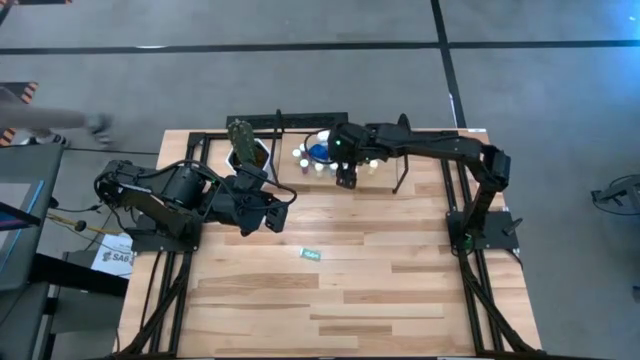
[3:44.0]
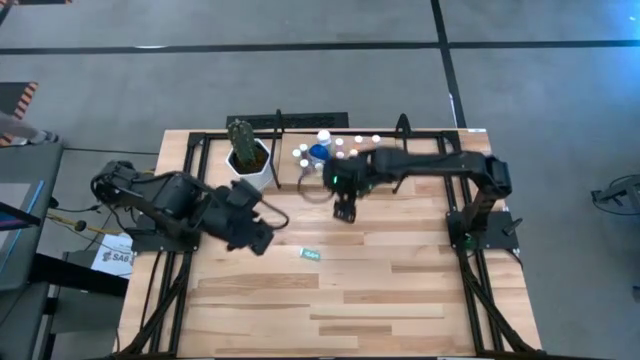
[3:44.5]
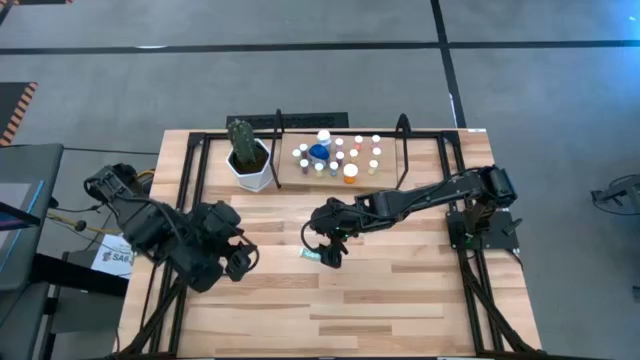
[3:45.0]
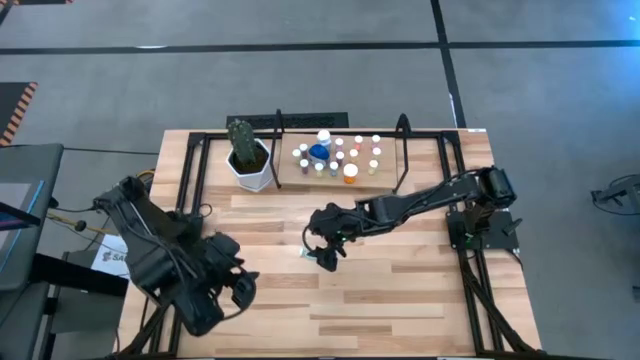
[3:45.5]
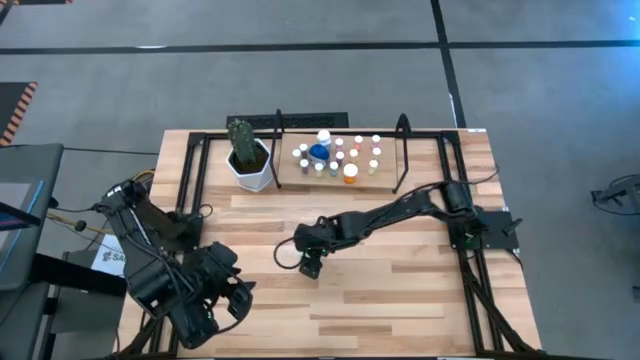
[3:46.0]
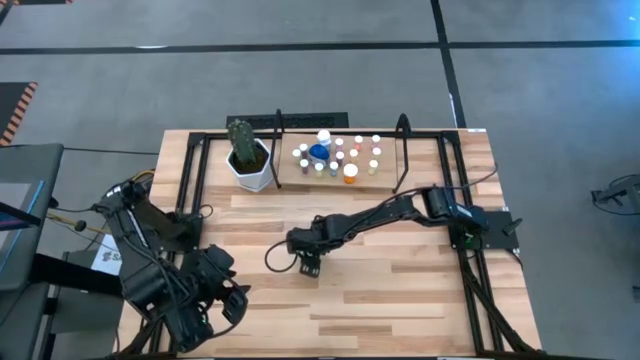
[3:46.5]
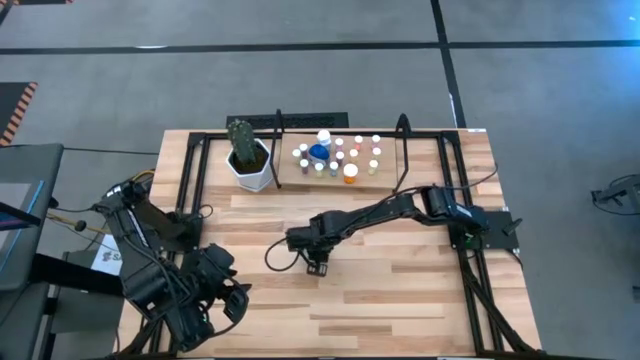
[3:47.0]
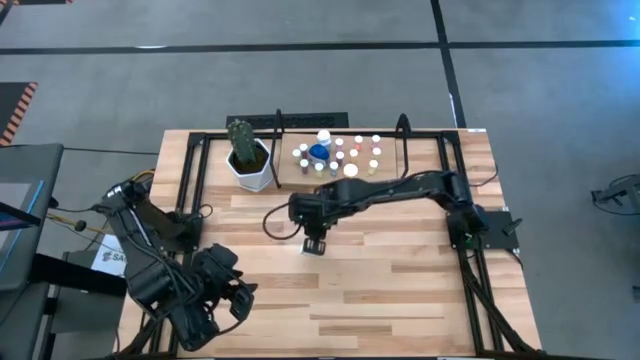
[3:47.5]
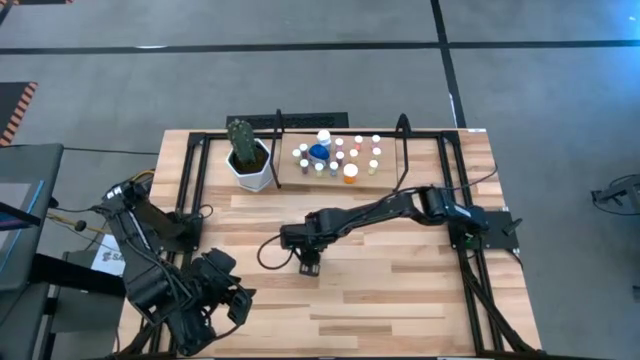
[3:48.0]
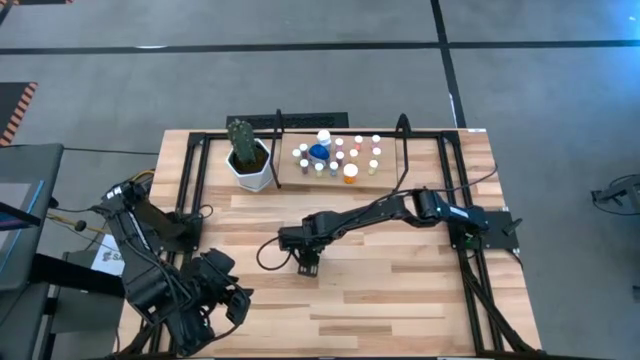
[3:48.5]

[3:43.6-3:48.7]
Task: Pick and place medicine bottles onto shelf by color
Put the small blue pill bottle on the shelf

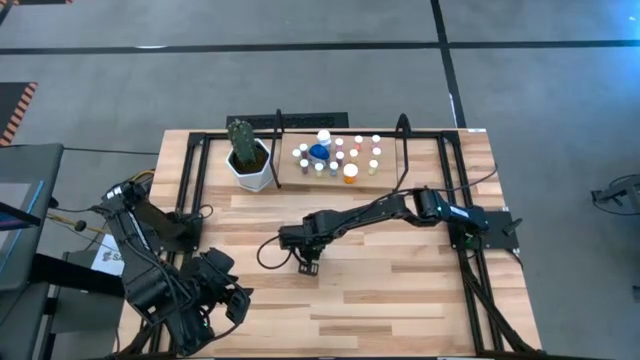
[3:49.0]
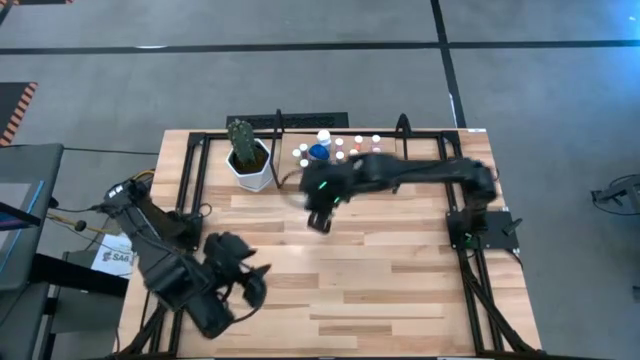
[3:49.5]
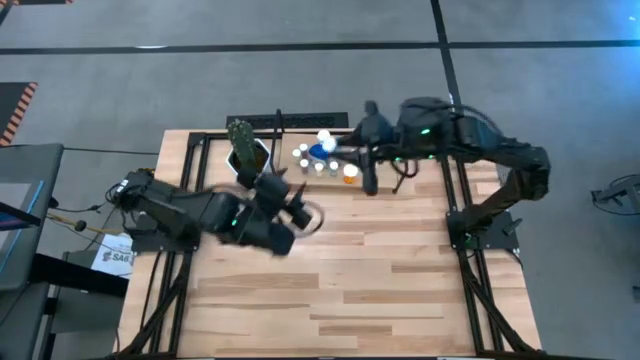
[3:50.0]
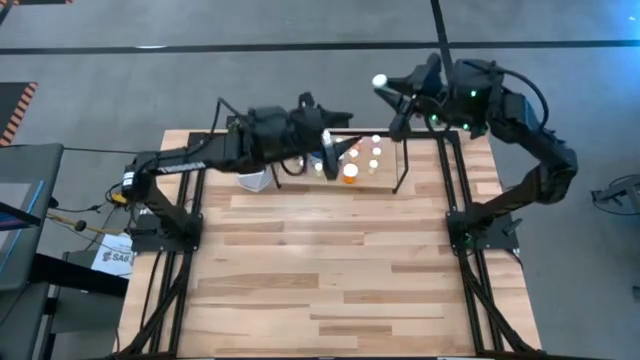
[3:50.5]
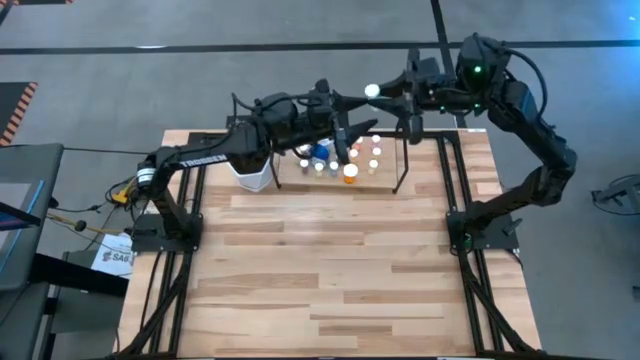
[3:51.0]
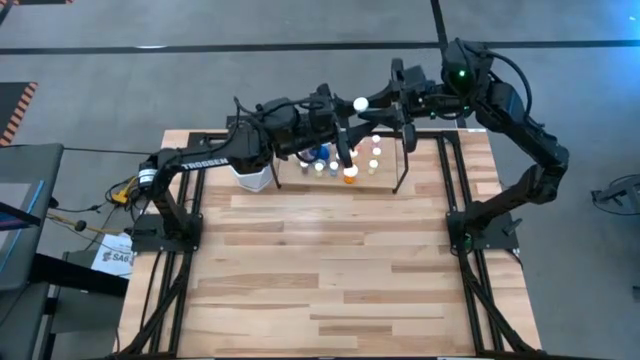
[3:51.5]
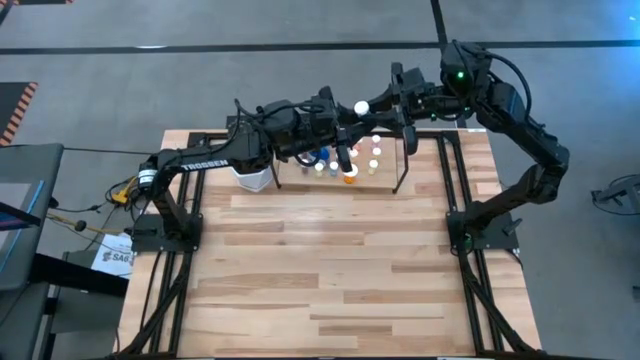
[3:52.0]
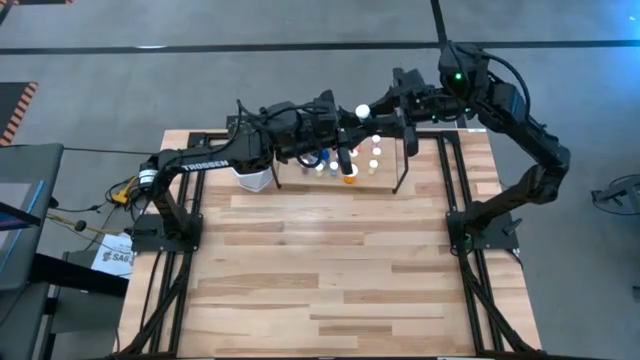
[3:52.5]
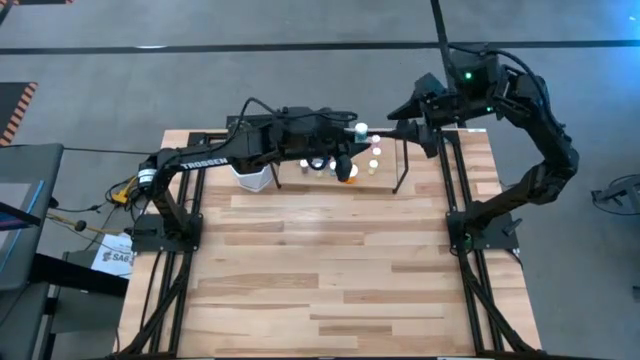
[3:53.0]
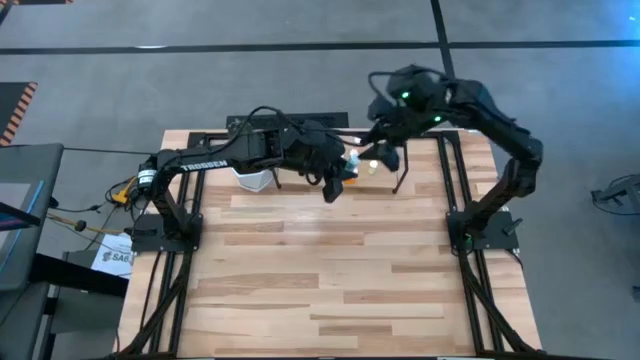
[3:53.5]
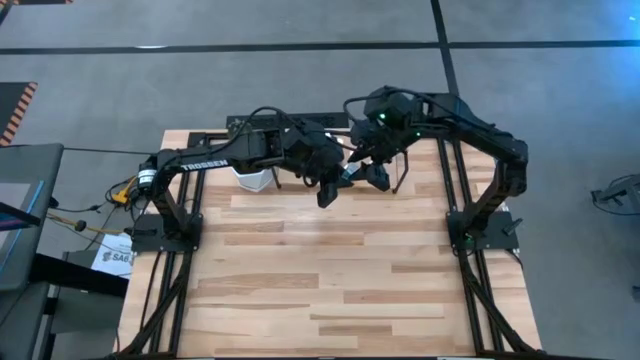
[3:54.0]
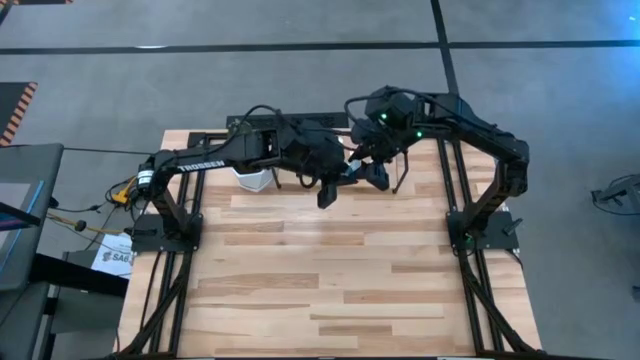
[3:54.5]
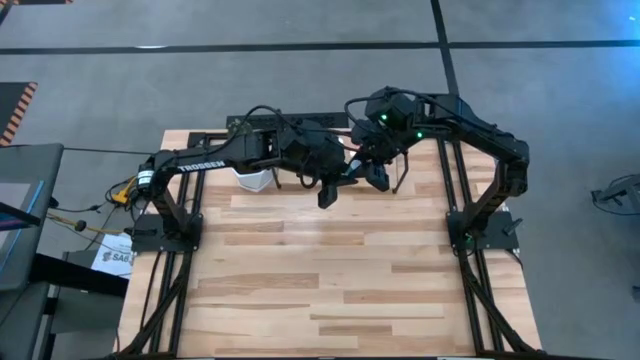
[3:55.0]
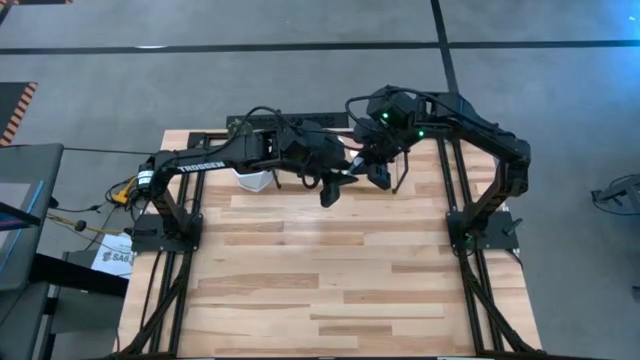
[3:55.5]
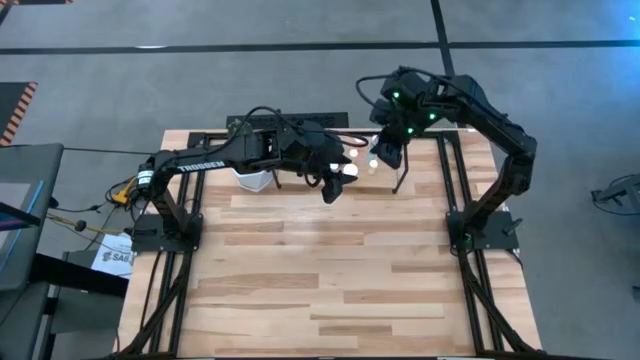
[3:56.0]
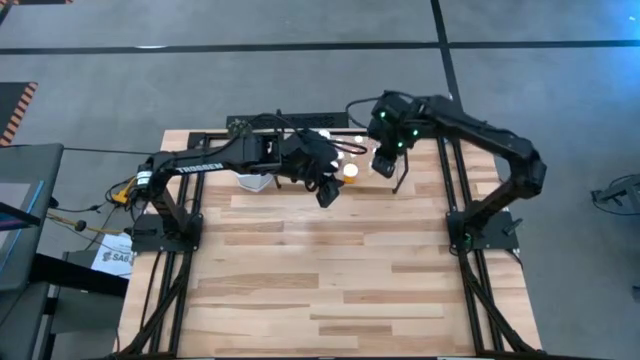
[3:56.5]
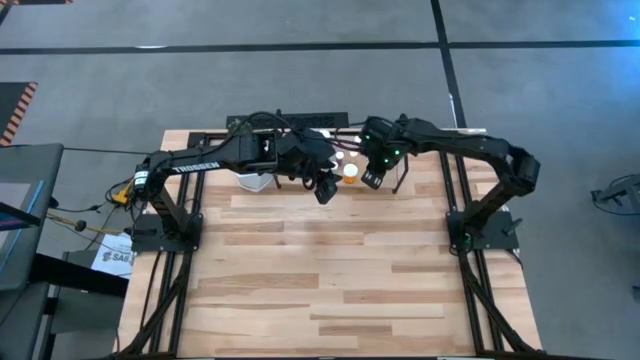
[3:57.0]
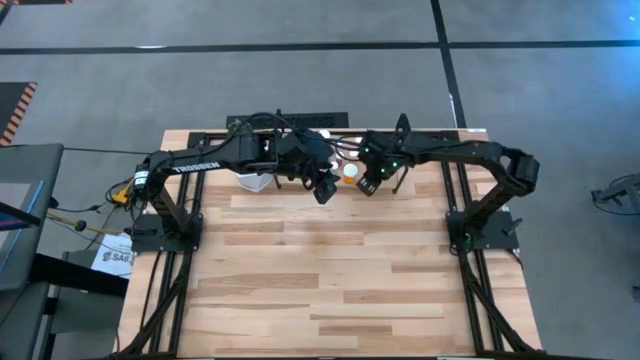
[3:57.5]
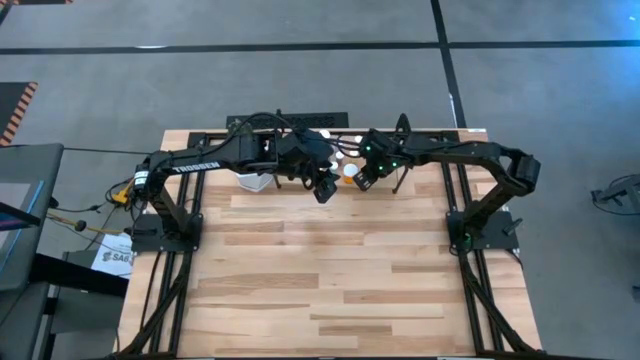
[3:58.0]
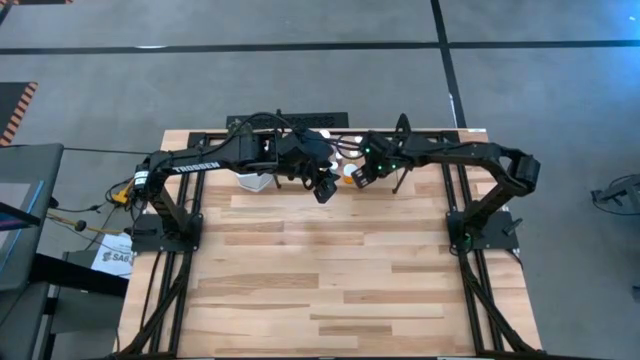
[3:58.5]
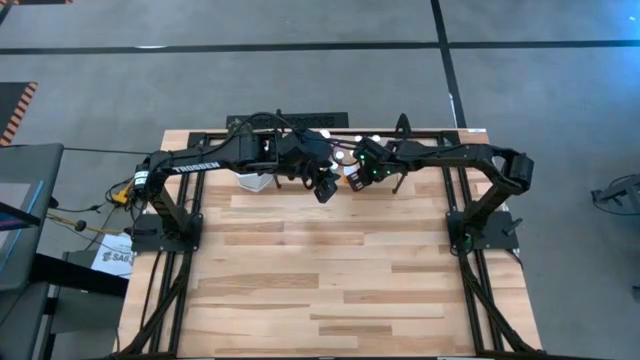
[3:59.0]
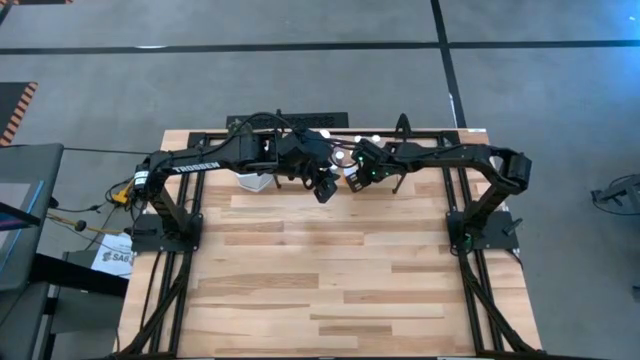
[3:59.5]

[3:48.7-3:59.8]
Put the small blue pill bottle on the shelf

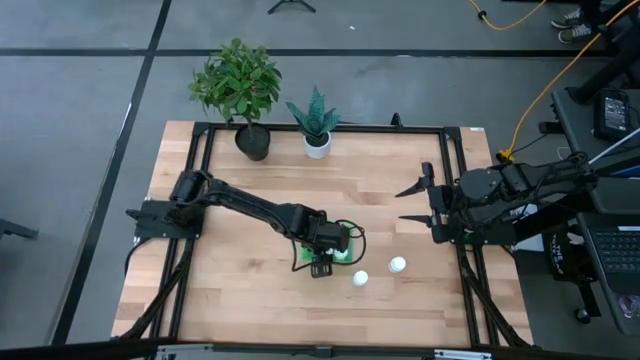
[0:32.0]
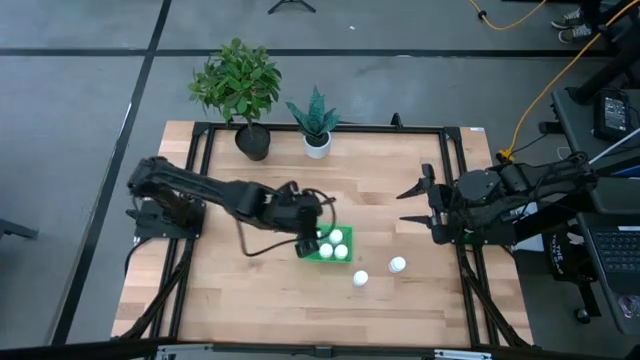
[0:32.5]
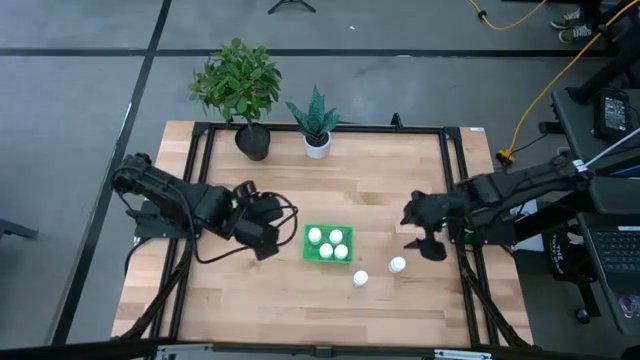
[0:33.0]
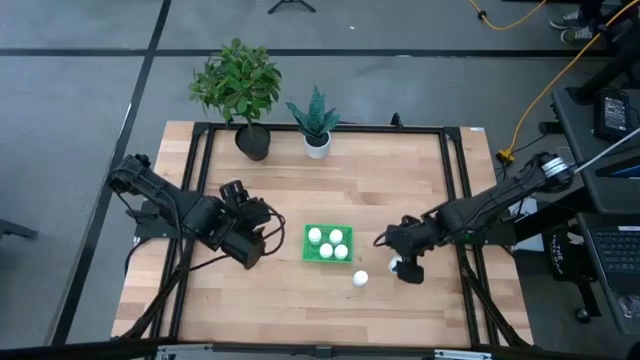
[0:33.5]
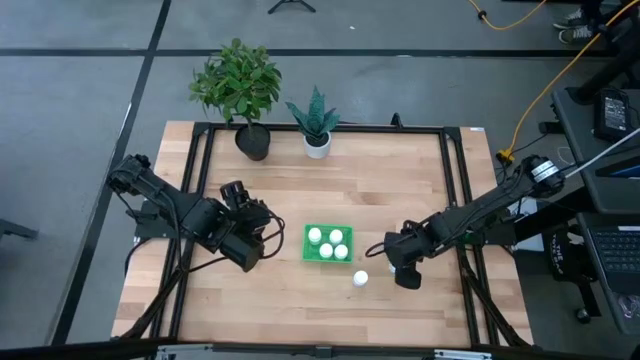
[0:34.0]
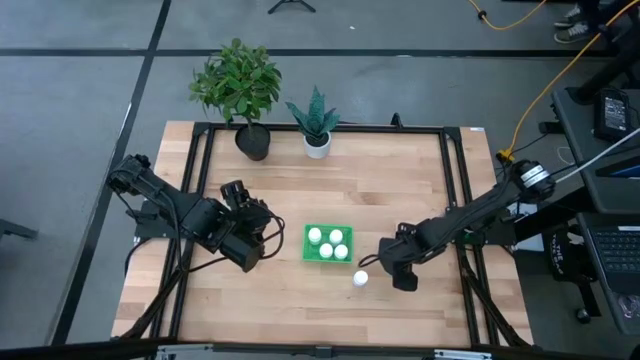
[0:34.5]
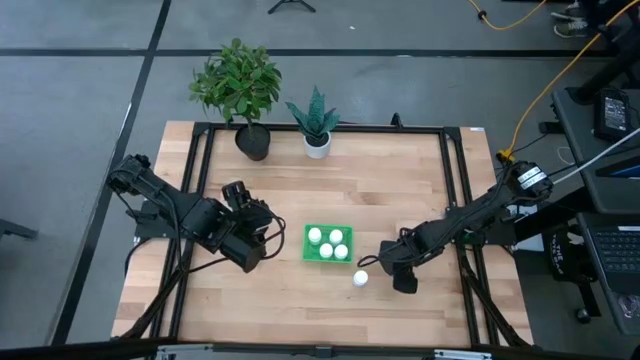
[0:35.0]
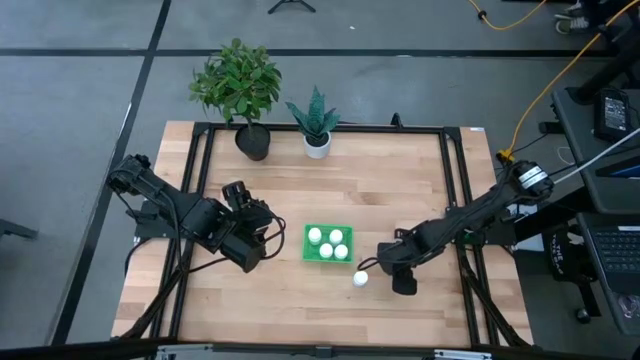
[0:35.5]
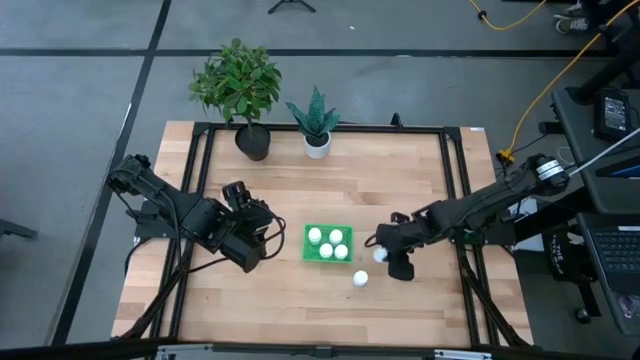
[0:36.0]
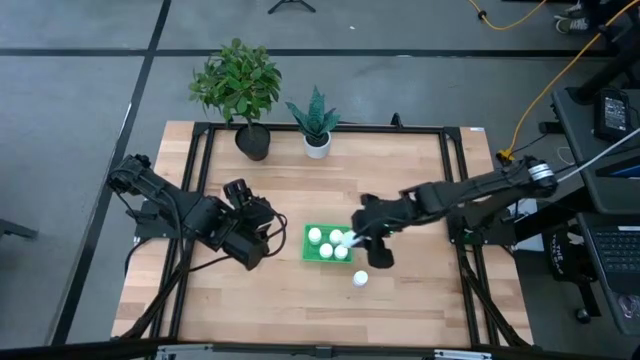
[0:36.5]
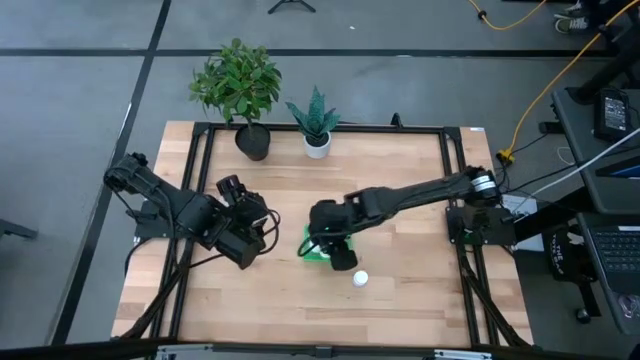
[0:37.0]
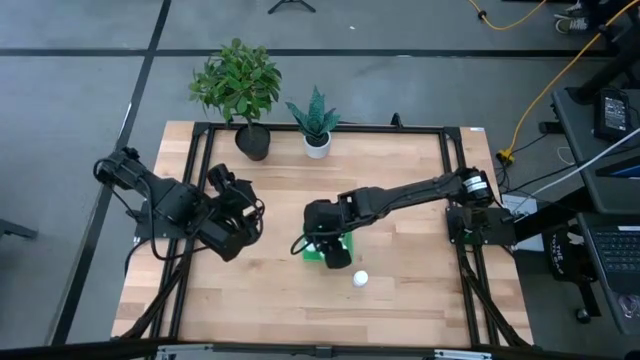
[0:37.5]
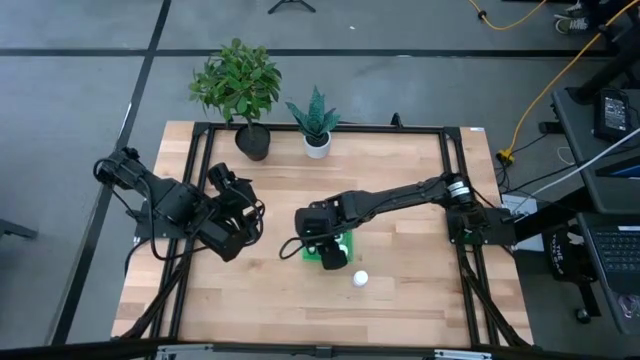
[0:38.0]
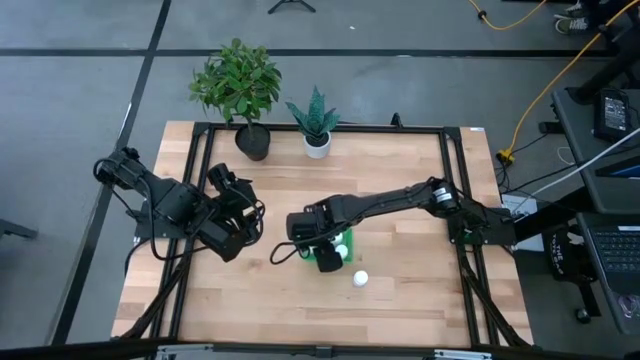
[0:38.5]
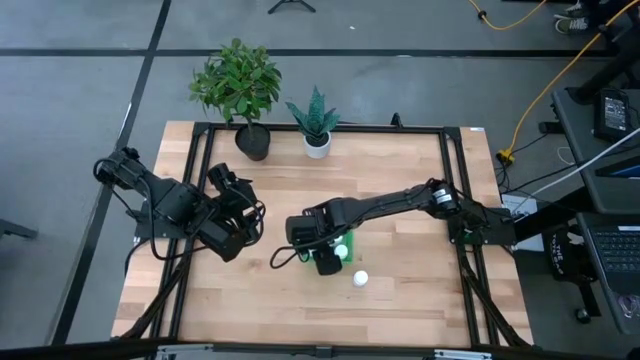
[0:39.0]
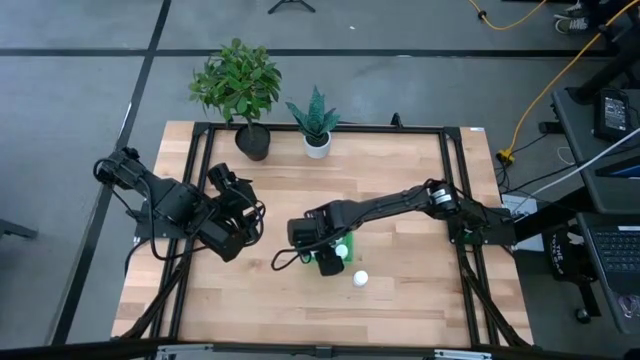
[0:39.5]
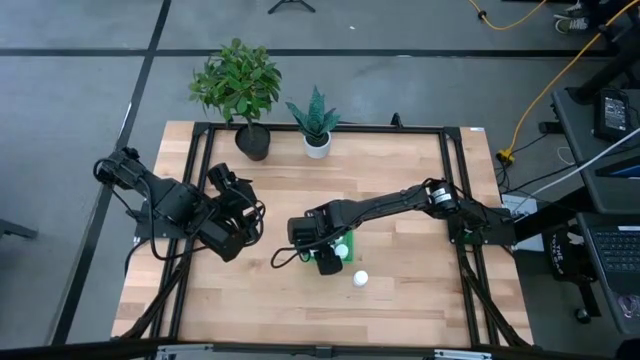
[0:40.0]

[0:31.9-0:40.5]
Task: Pick and place pill bottles into a basket
Put the white pill bottle into the green bin
